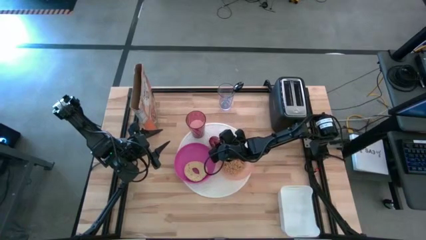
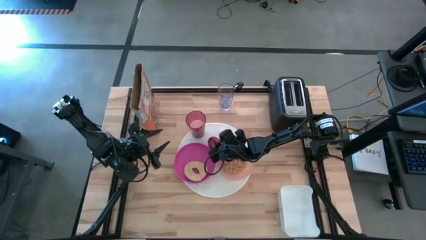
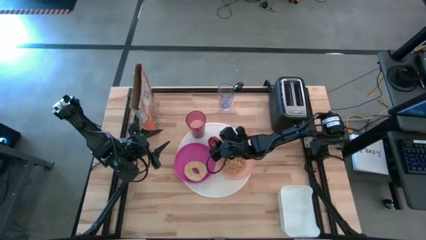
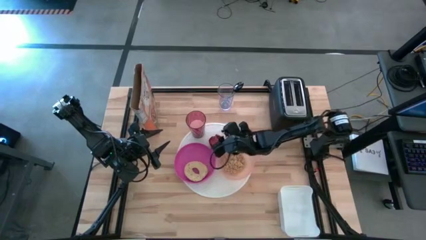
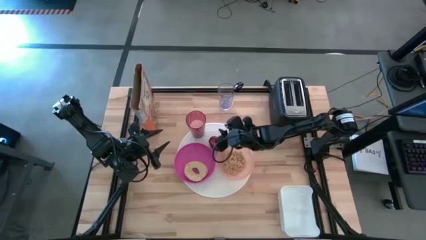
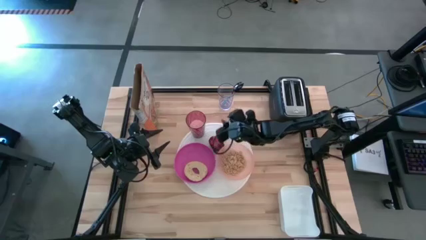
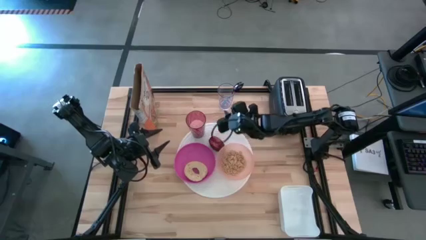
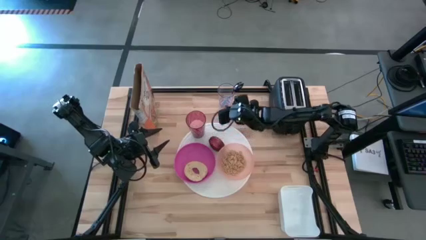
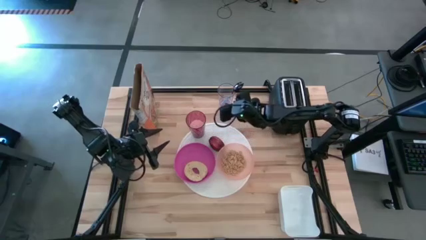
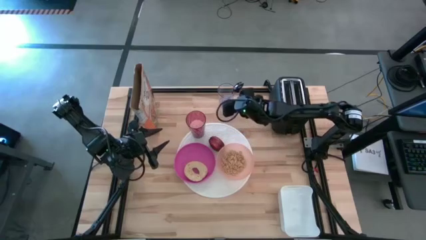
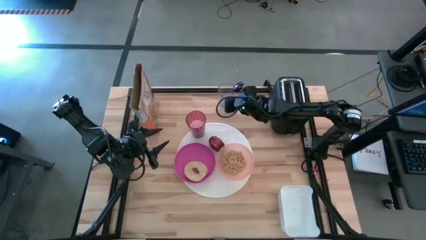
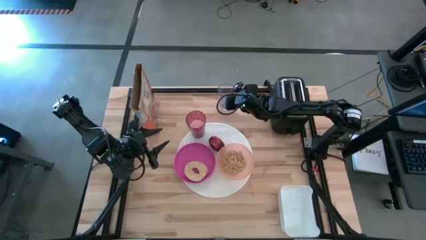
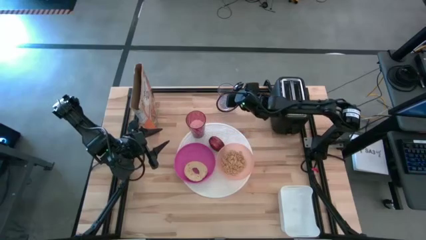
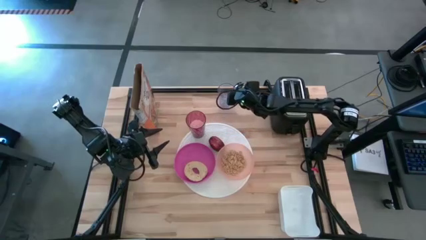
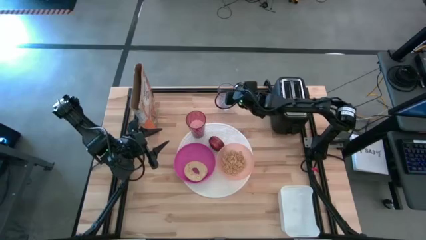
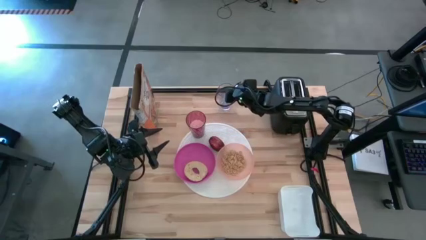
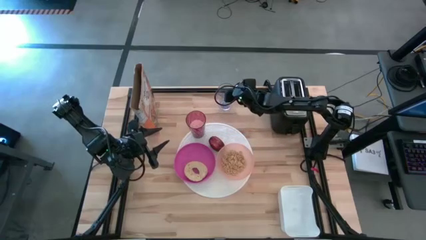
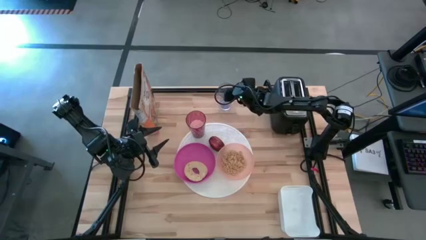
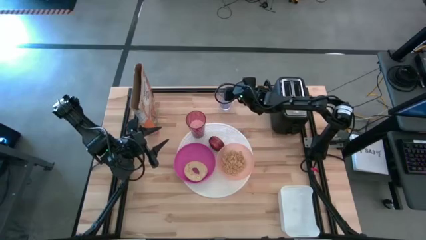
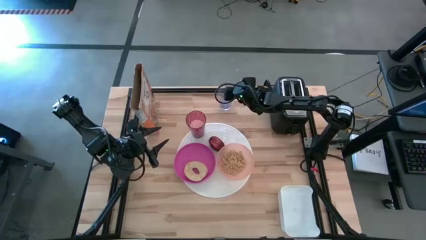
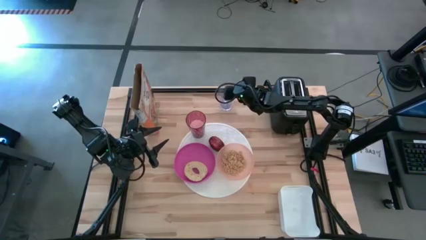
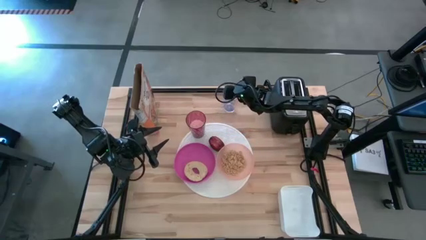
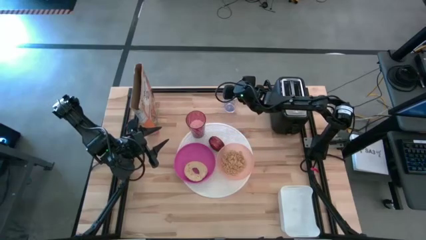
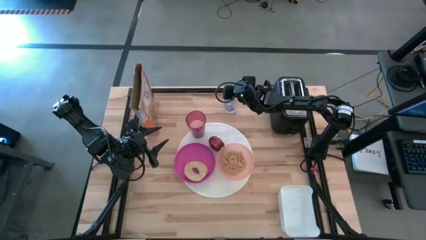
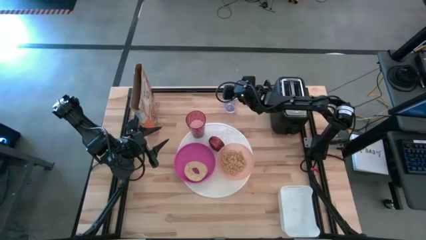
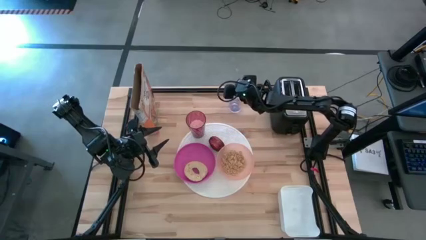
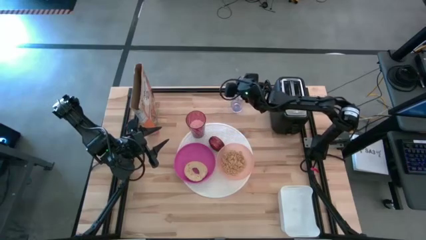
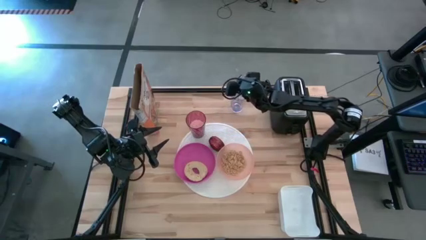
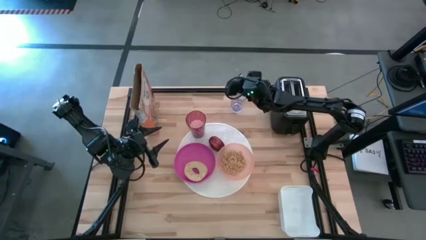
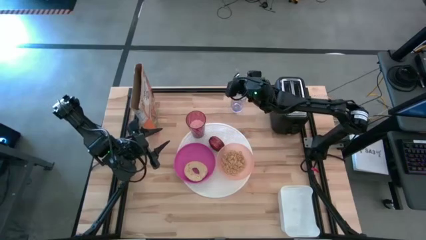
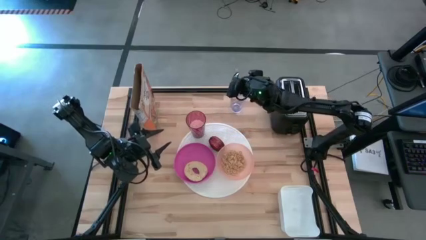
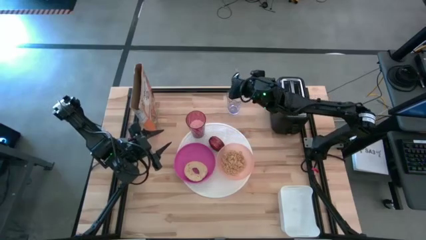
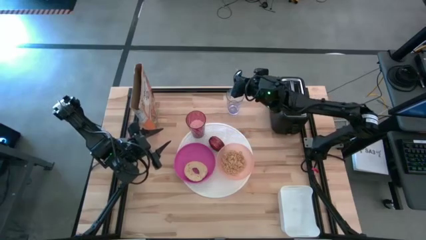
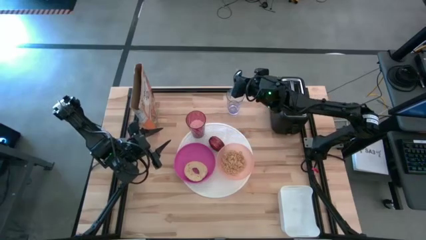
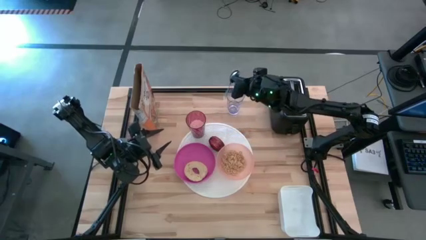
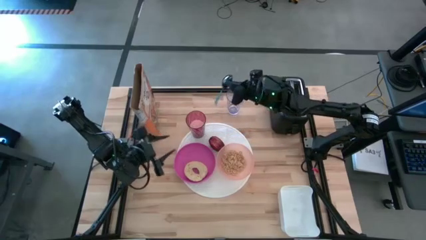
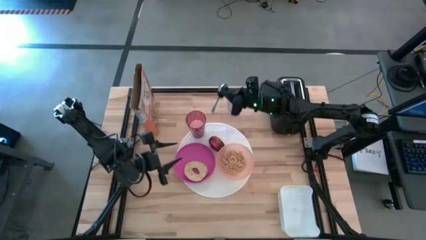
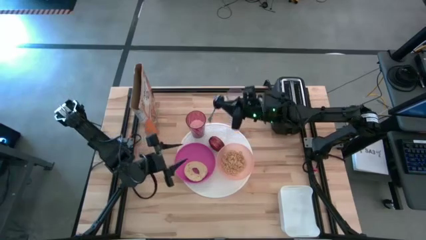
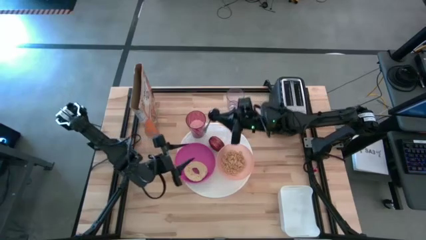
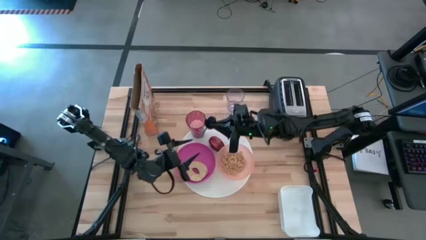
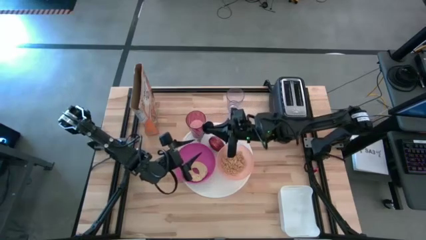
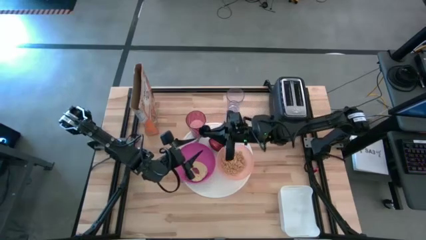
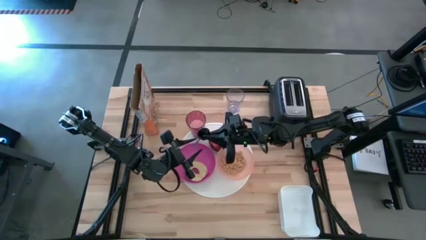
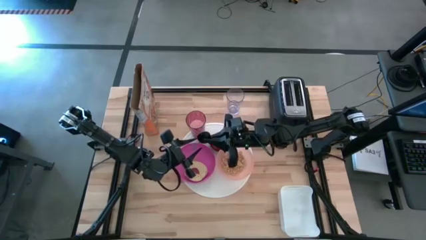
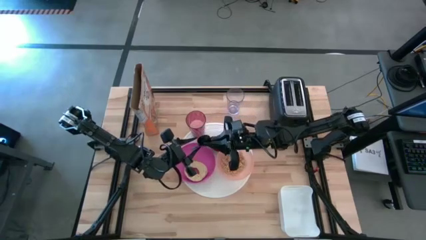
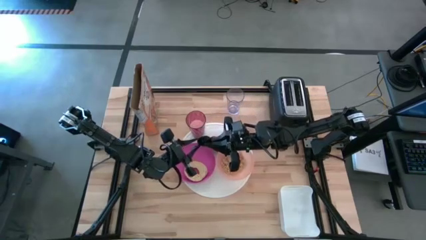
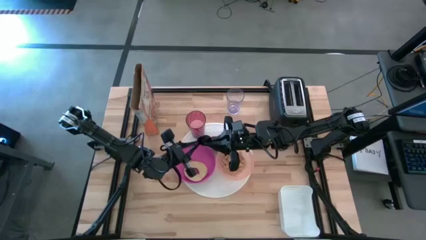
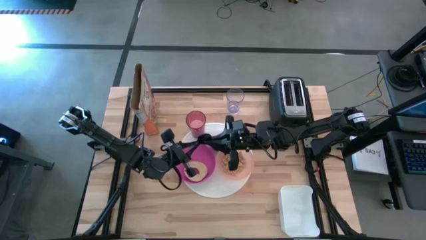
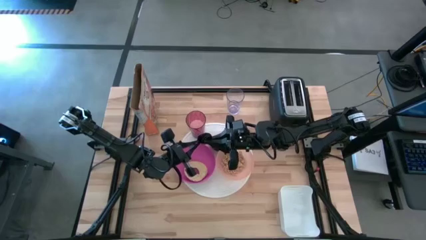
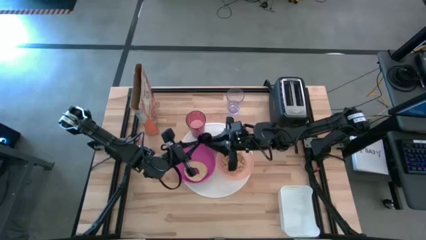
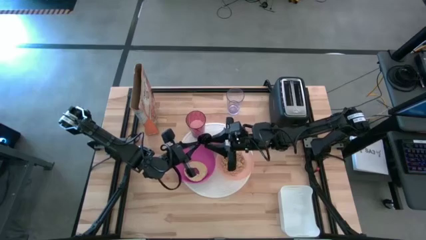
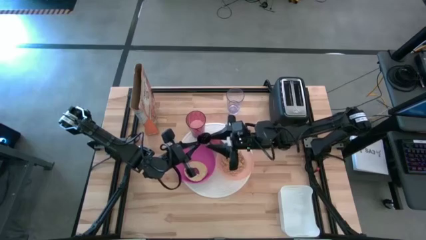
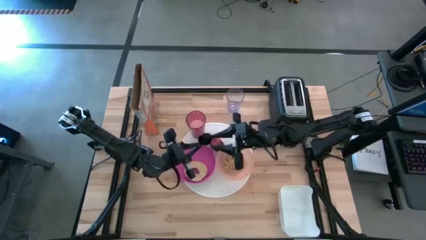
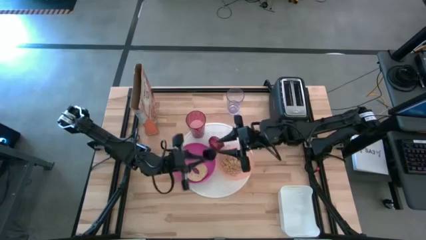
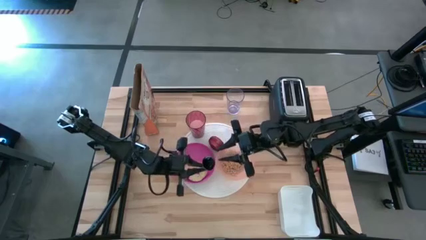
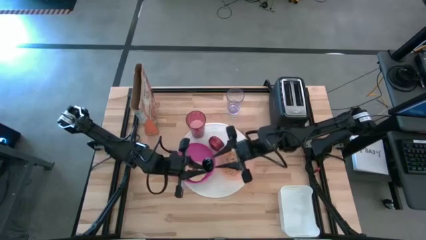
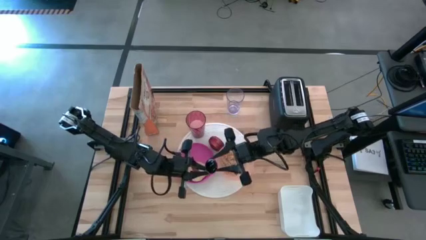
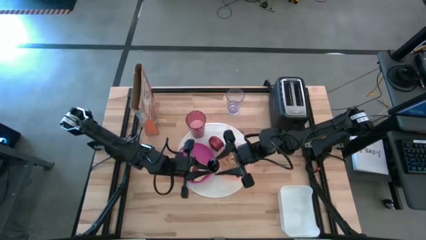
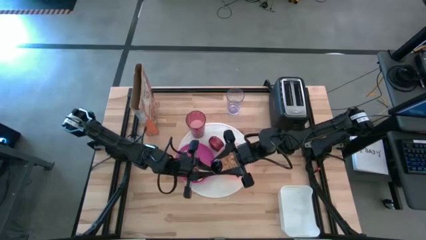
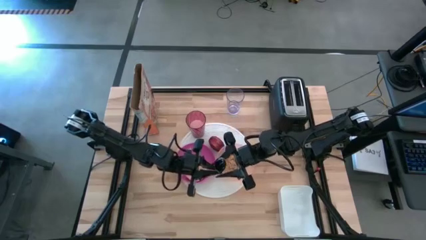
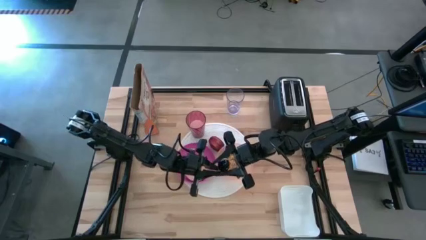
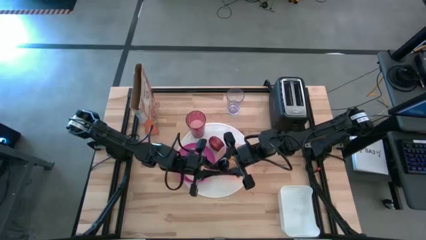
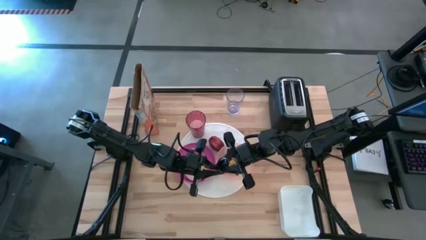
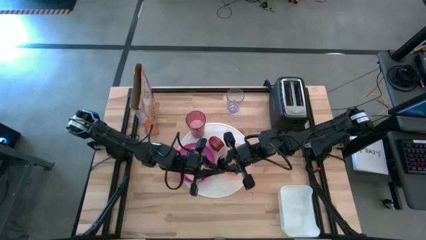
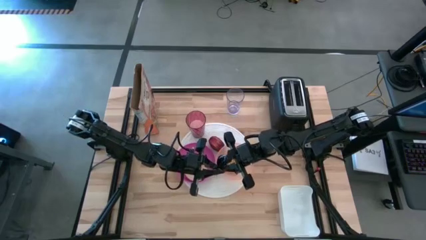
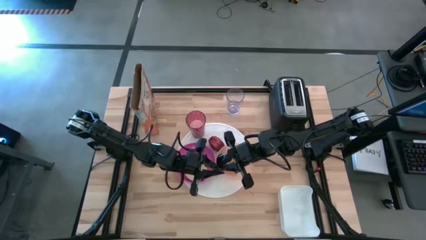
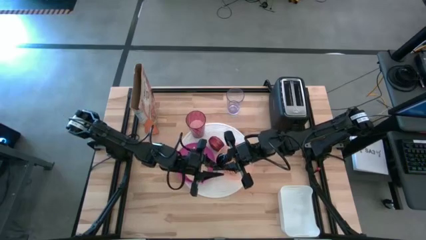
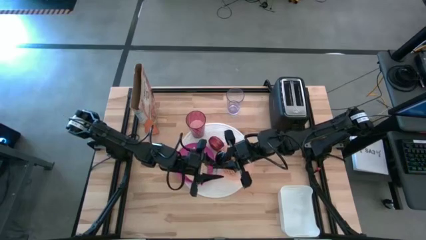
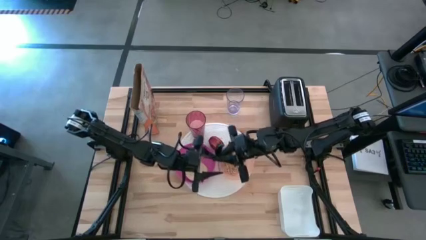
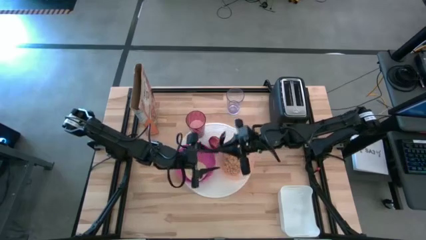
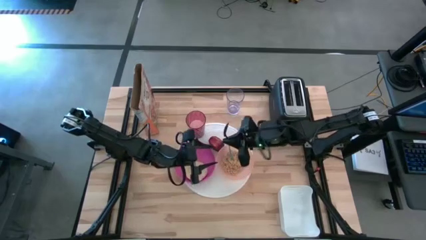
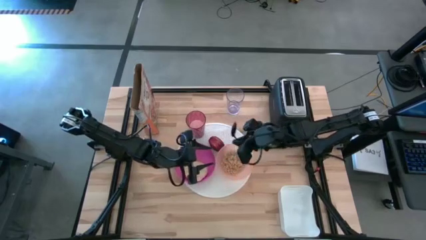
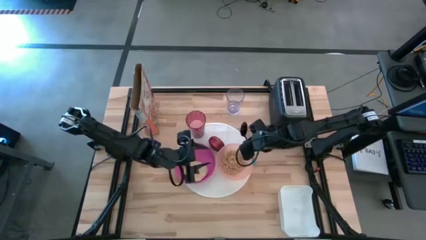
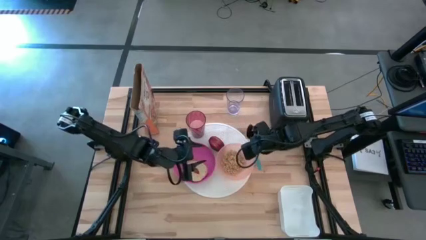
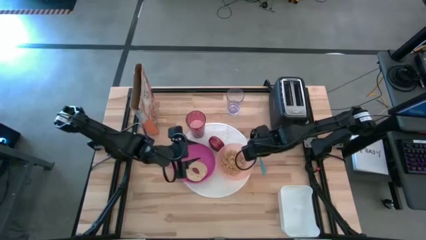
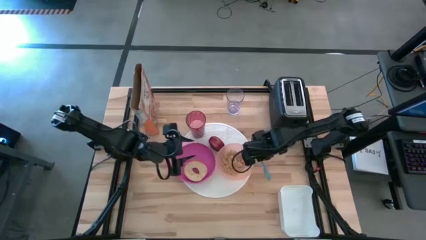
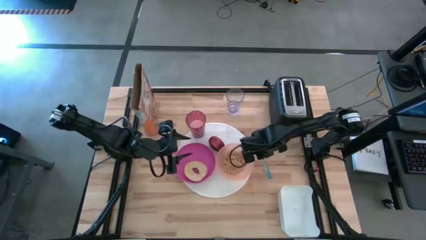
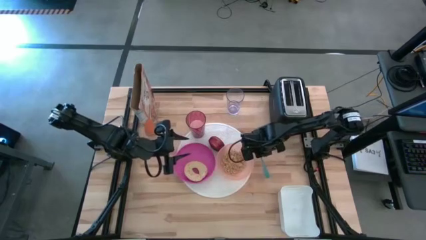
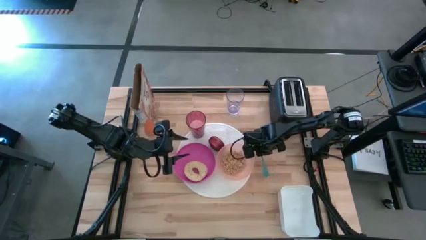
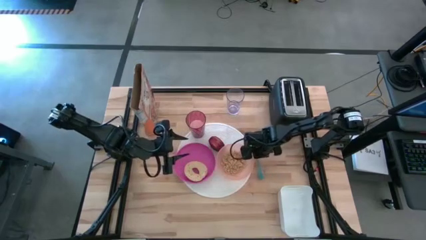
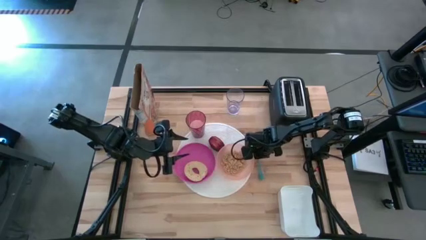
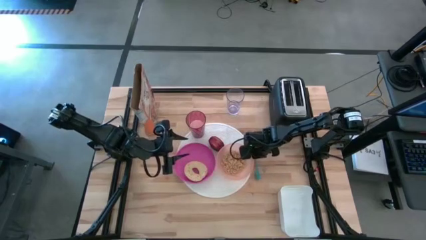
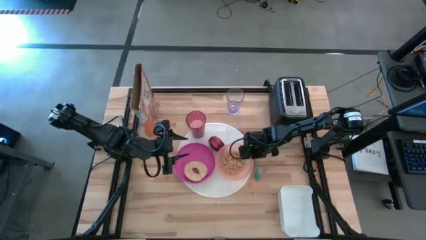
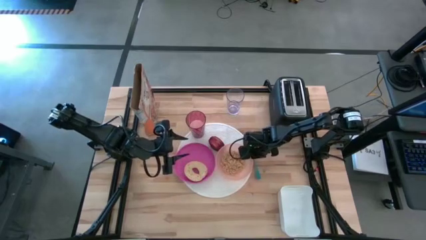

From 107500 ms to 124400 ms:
Task: Arrange a breakfast setting
Put the spoon on the white mat to the right of the orange bowl
